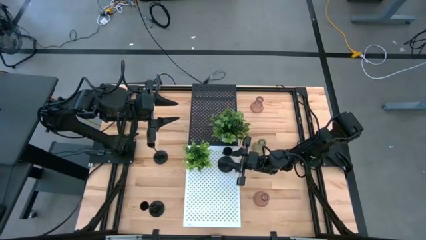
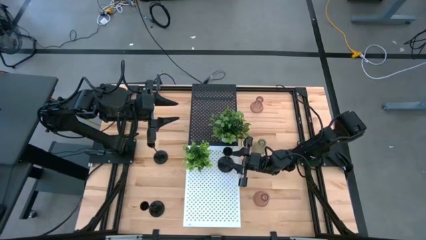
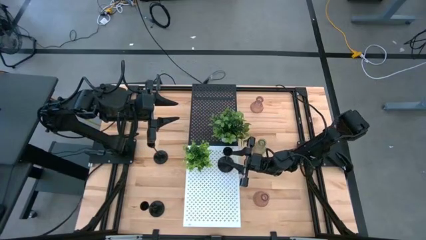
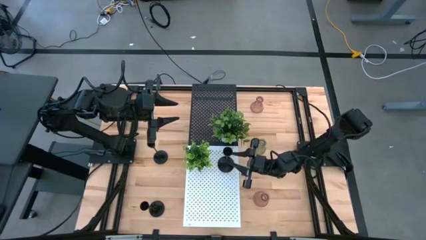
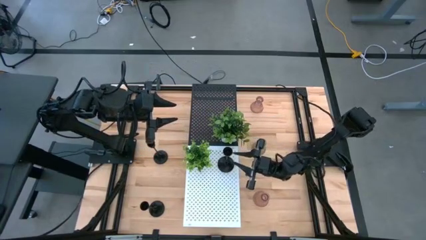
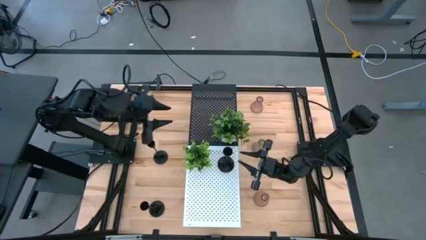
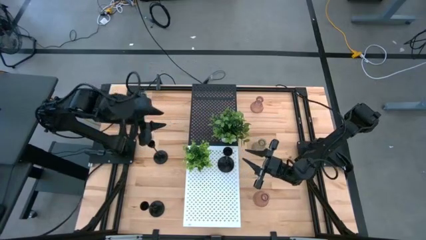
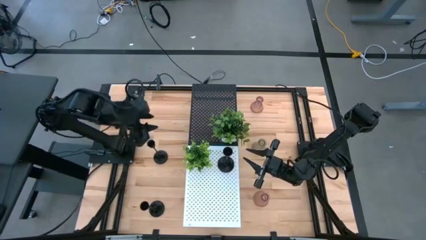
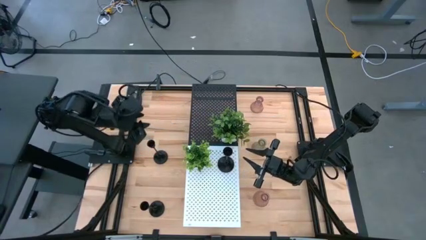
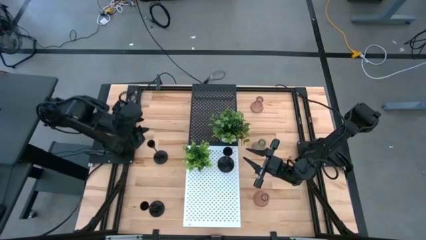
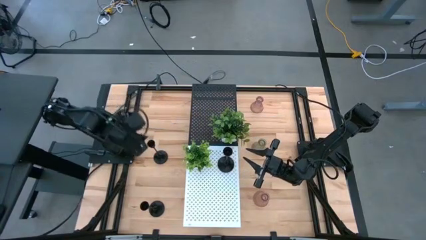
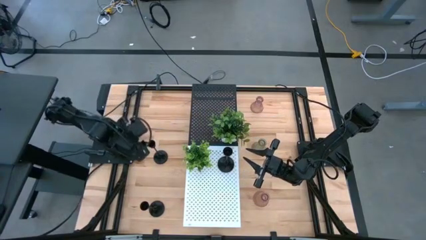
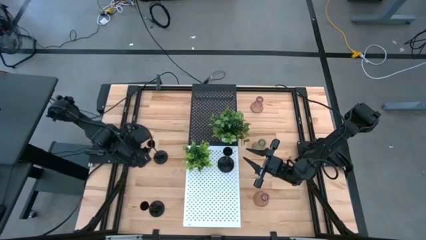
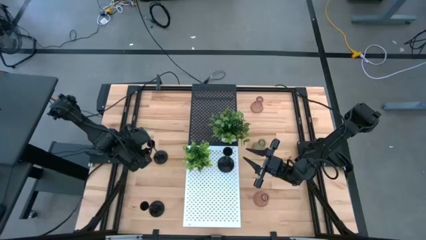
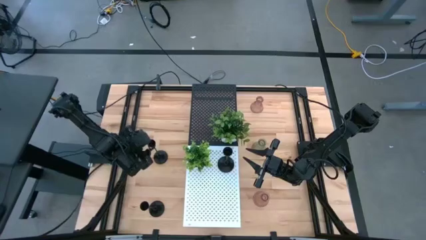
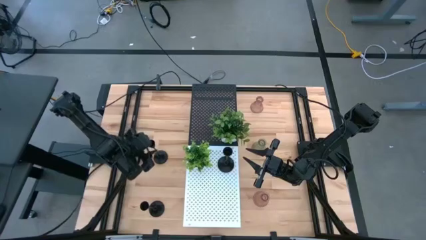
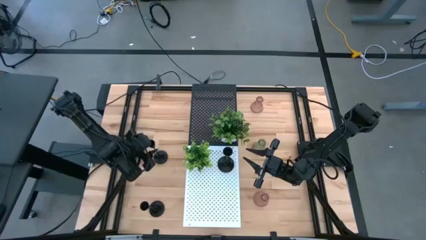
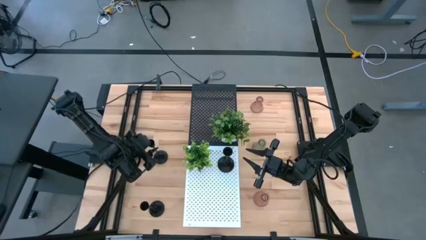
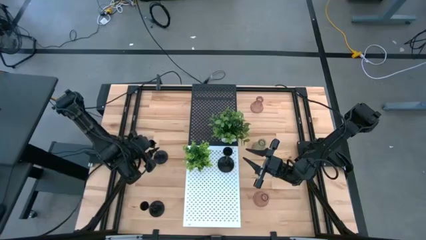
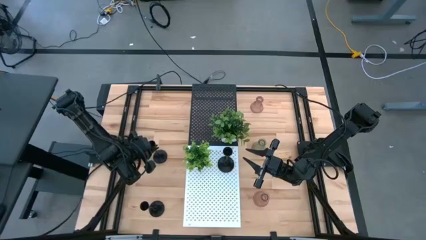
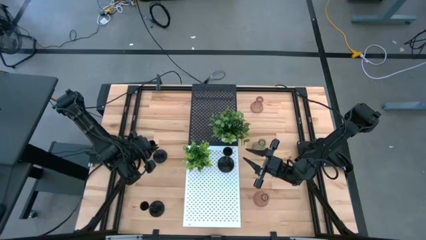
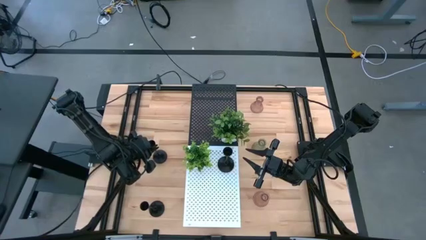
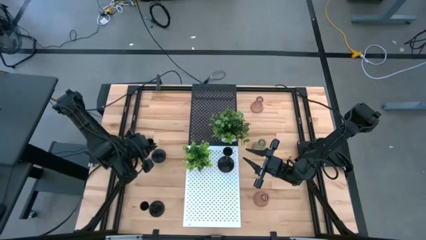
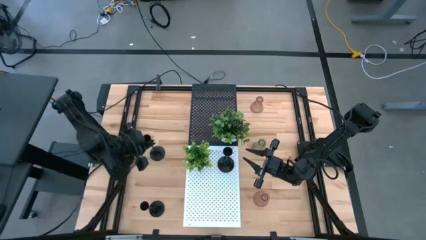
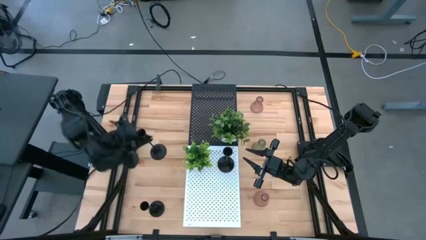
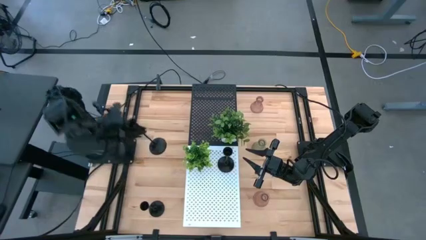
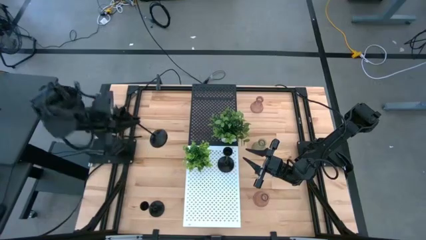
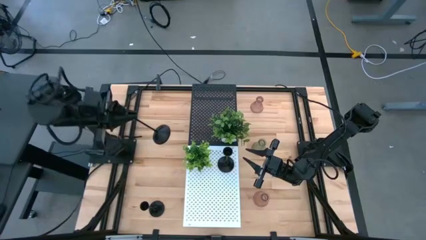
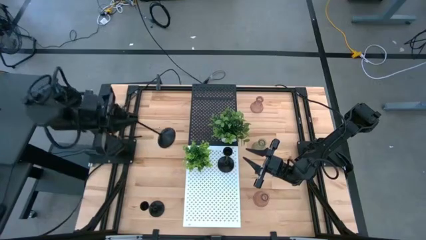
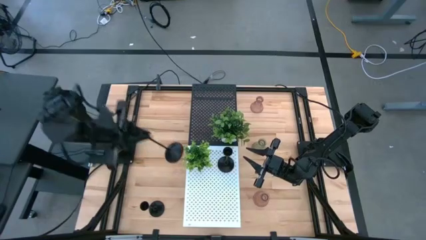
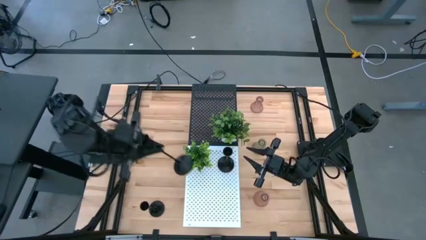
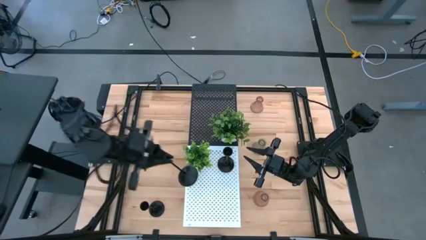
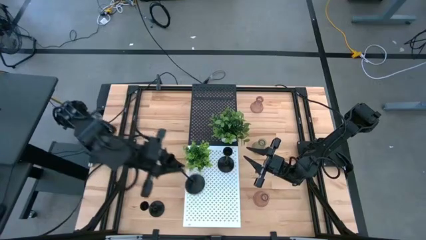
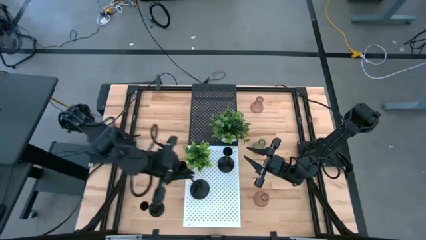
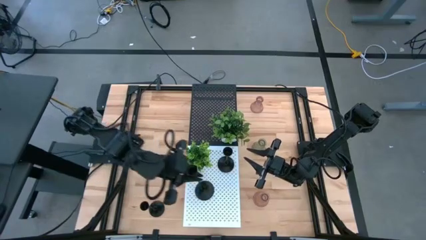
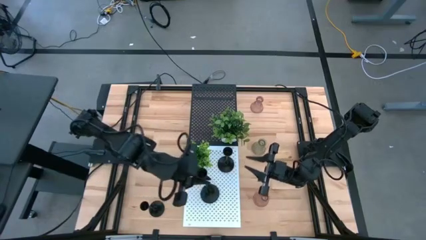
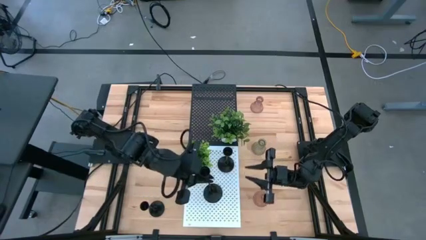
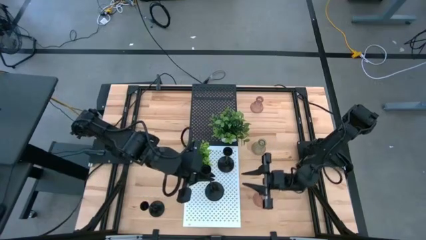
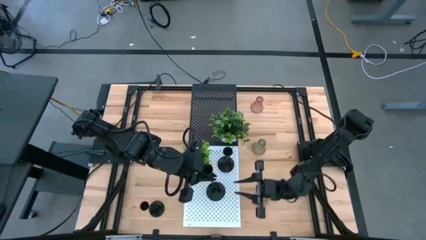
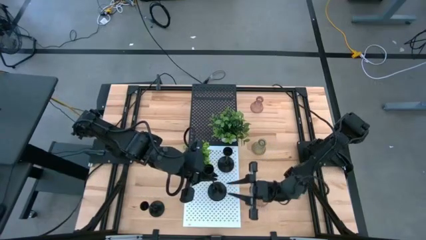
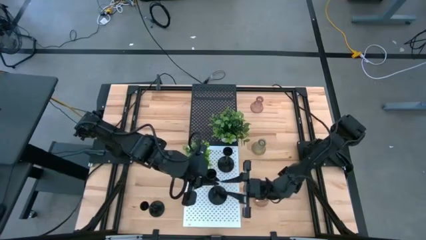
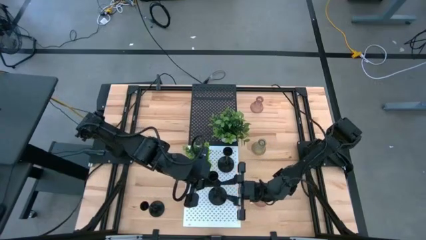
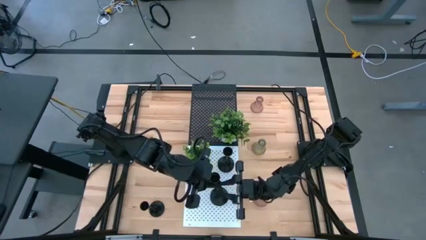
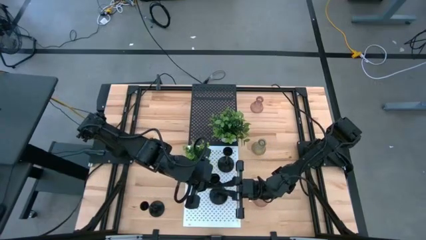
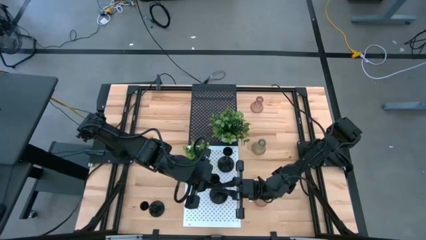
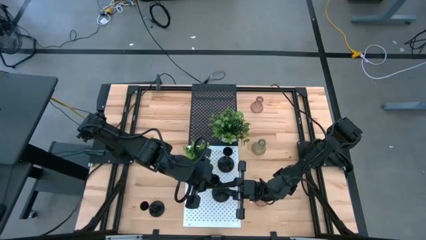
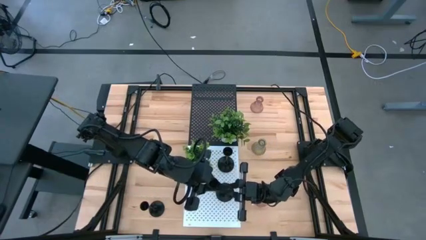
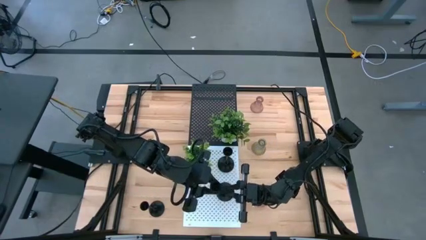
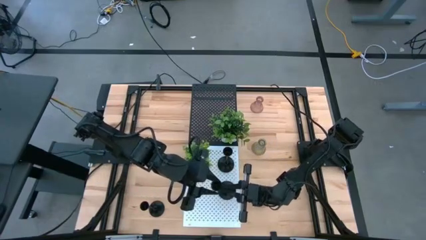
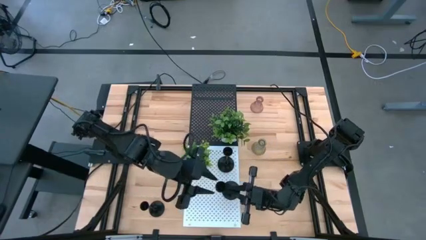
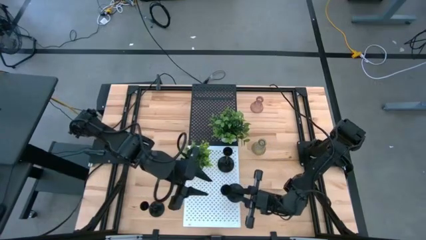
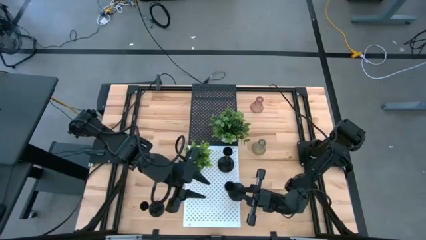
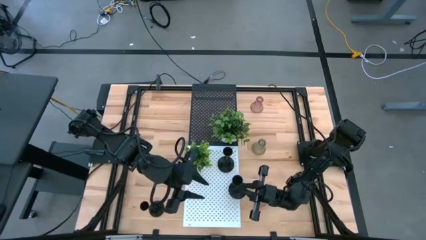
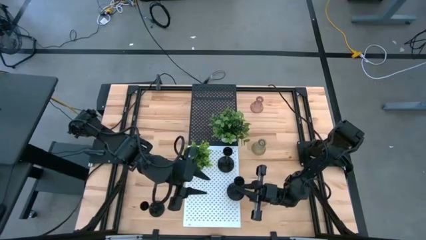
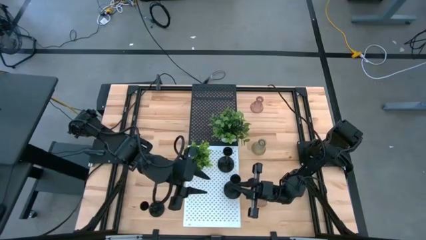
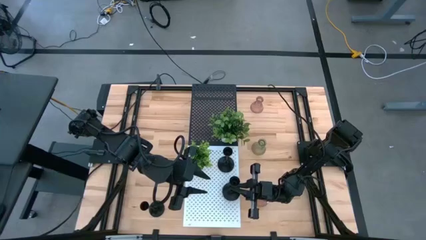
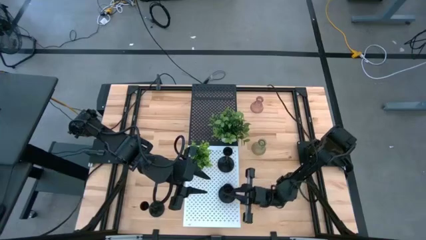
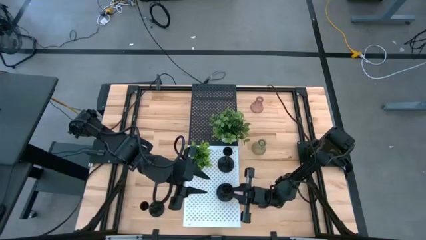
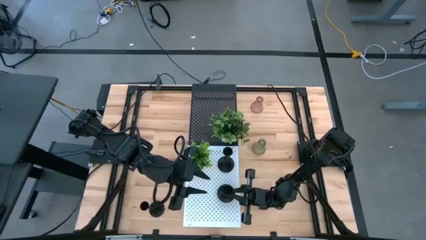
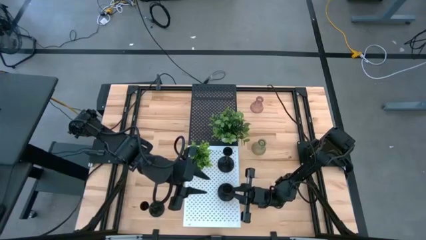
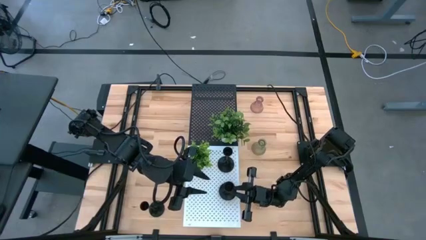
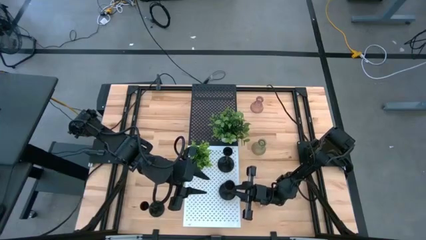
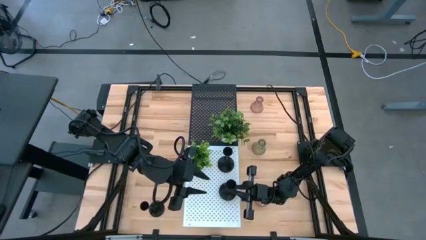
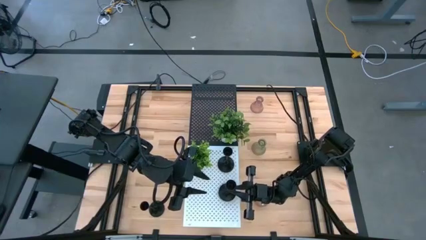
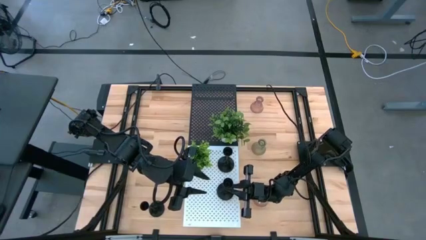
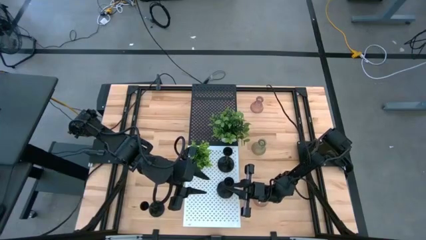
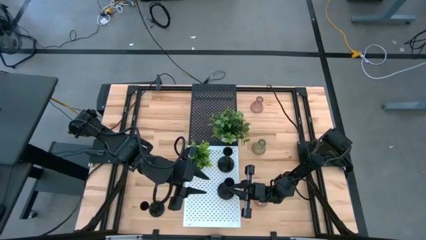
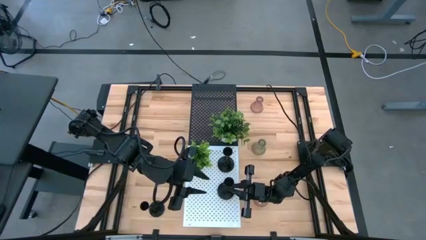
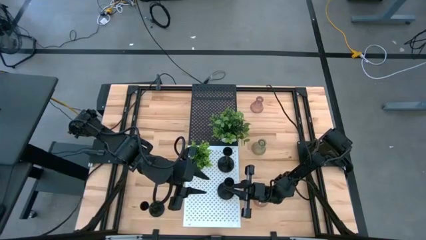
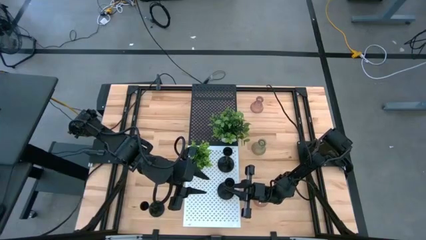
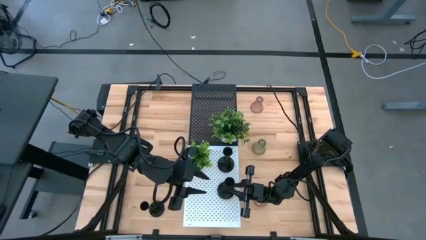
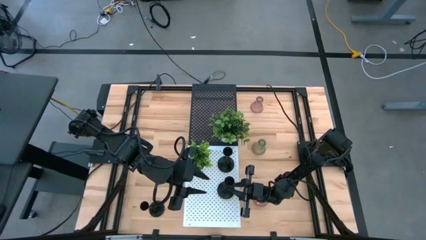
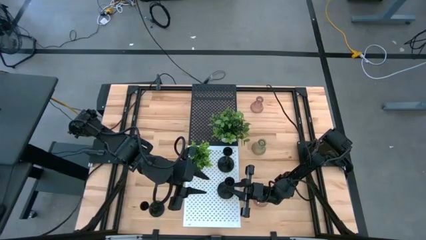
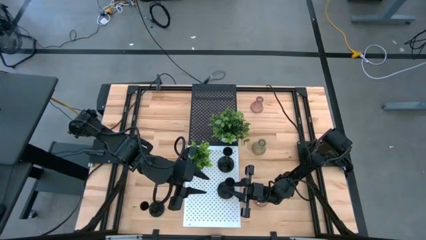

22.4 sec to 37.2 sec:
Task: Pick & Place candle stick holders
Put the top black candle holder on the white shelf

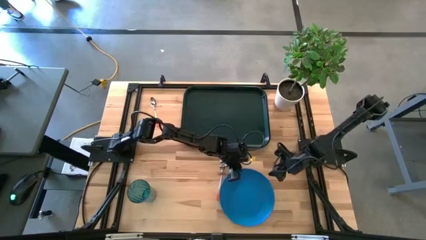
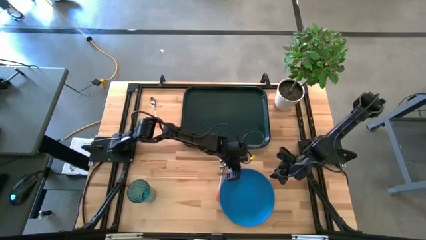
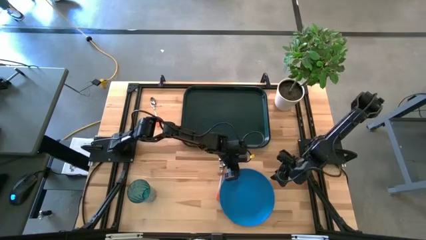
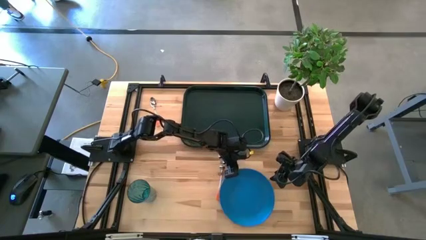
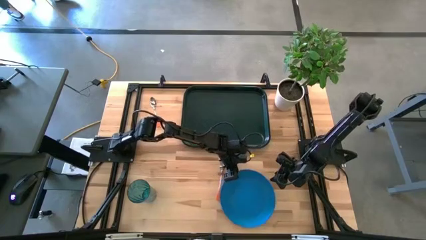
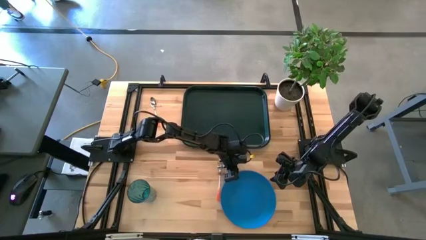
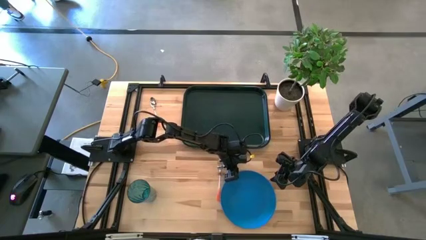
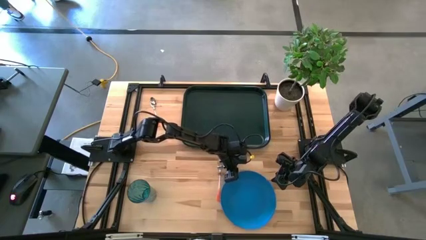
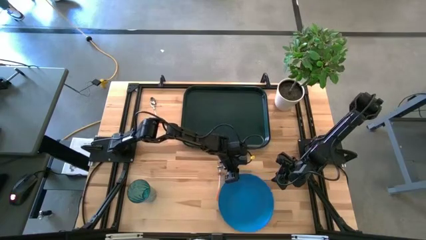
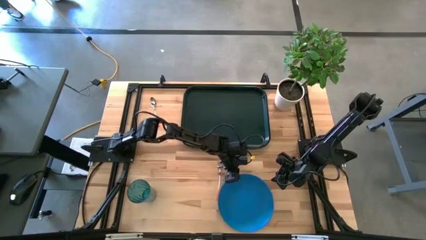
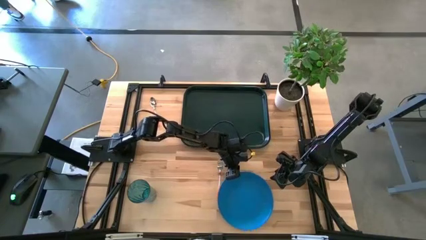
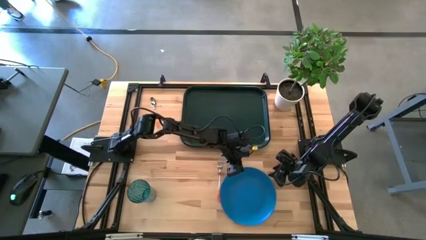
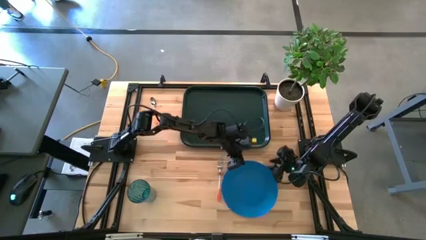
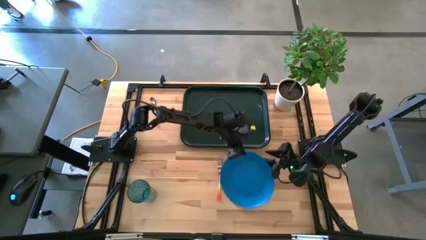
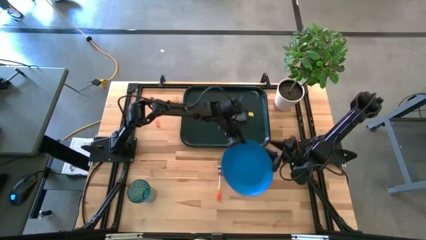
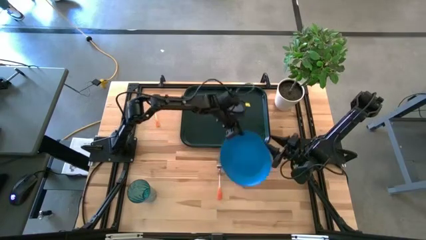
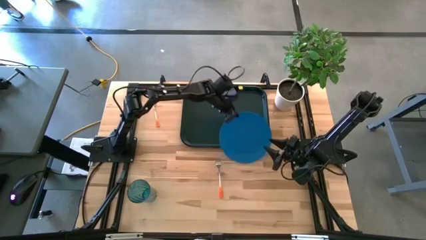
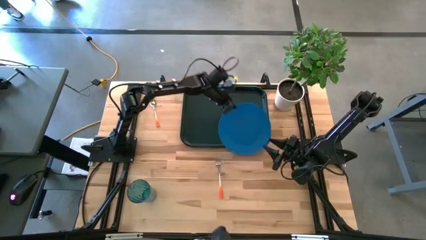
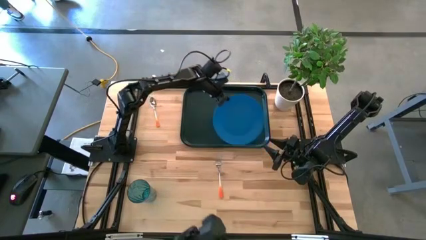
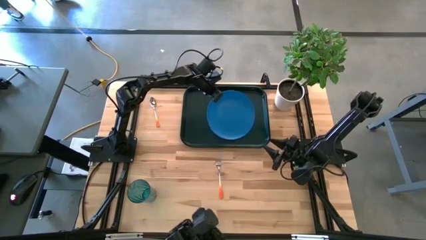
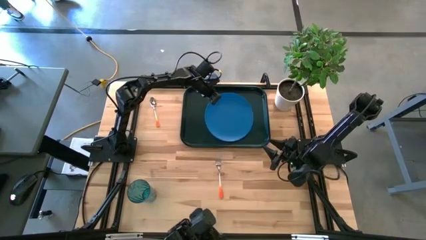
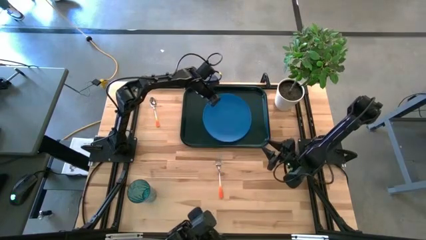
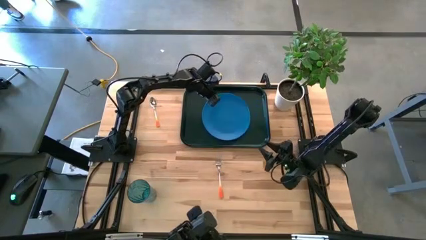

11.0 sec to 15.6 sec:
Task: Pick and place plate/cup/fork/spoon on tray
Put the blue plate on the center of the green tray
